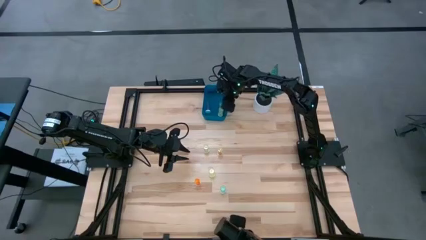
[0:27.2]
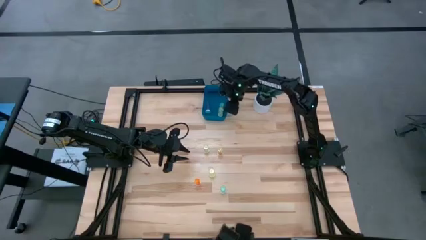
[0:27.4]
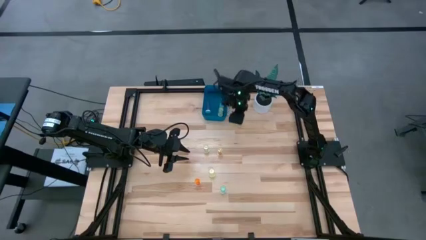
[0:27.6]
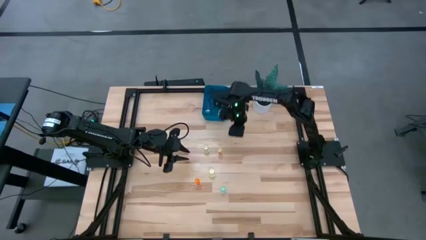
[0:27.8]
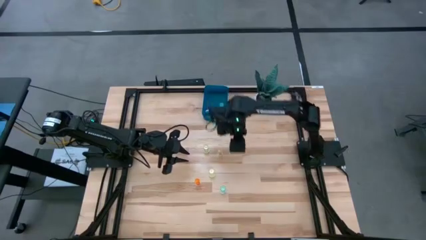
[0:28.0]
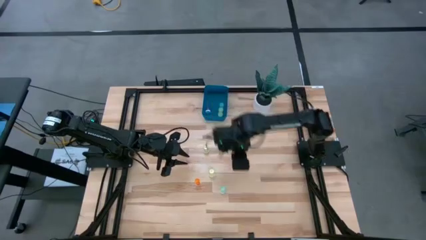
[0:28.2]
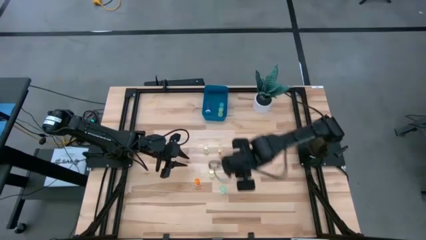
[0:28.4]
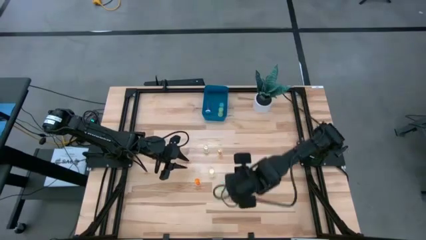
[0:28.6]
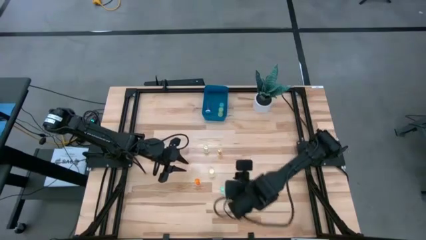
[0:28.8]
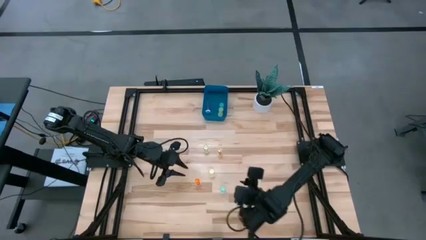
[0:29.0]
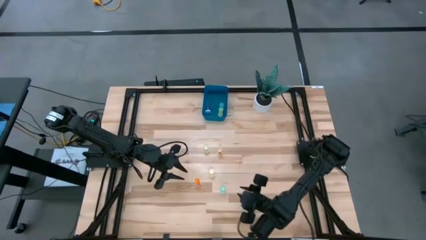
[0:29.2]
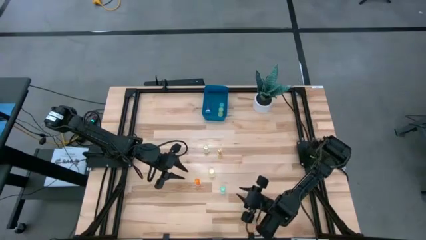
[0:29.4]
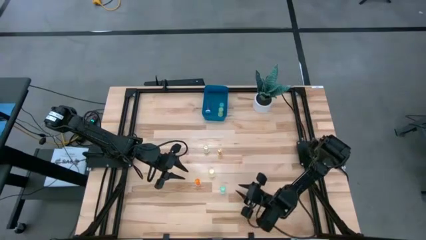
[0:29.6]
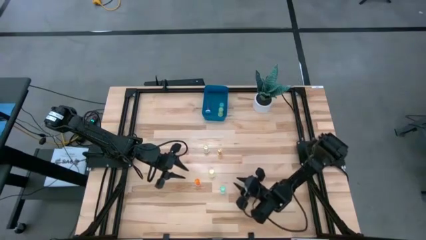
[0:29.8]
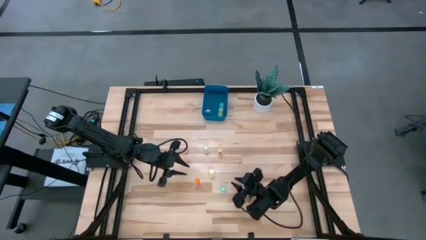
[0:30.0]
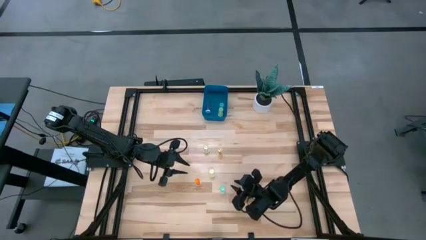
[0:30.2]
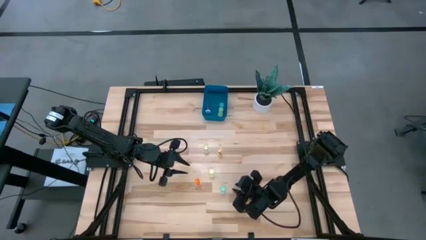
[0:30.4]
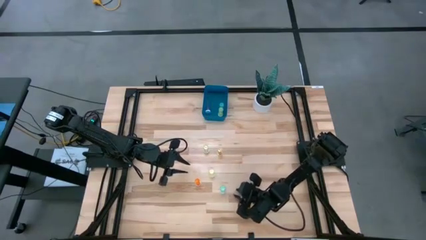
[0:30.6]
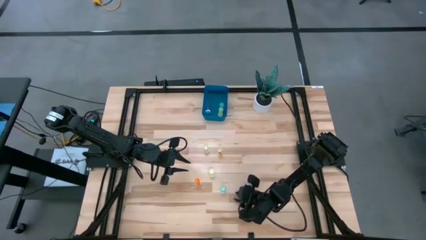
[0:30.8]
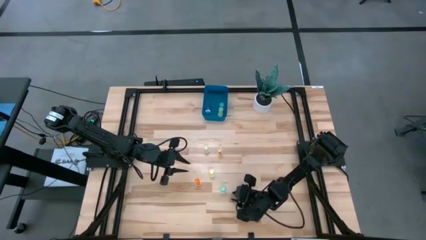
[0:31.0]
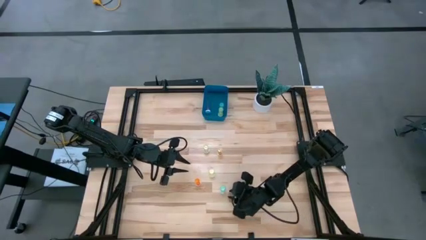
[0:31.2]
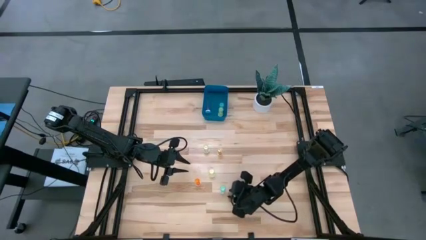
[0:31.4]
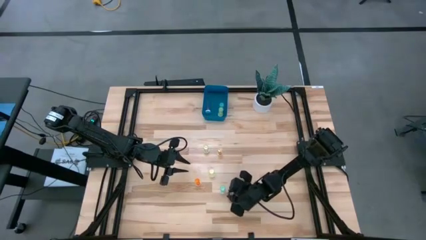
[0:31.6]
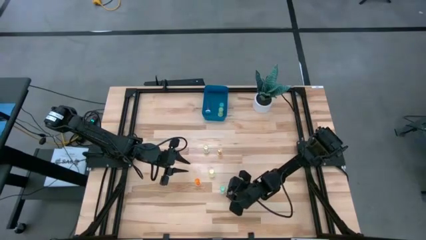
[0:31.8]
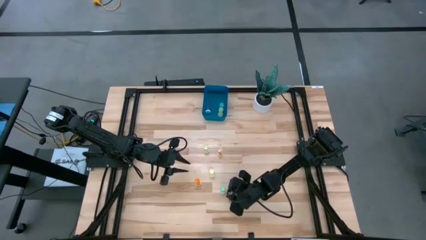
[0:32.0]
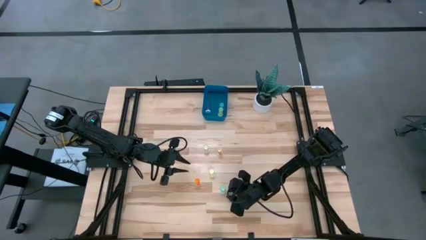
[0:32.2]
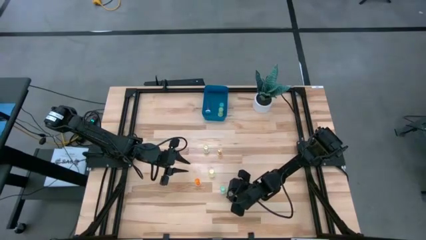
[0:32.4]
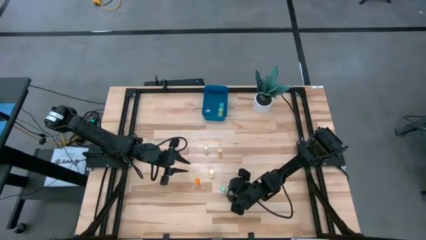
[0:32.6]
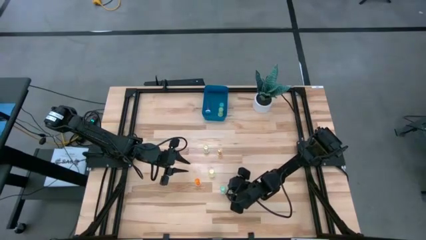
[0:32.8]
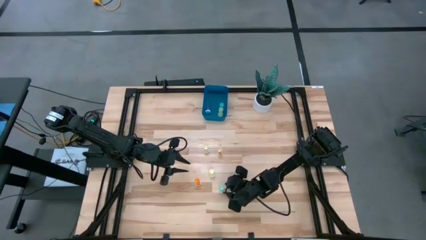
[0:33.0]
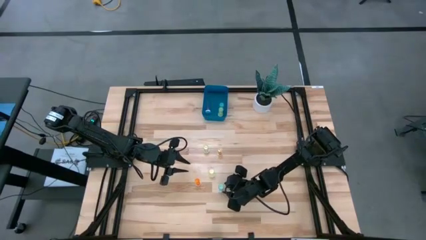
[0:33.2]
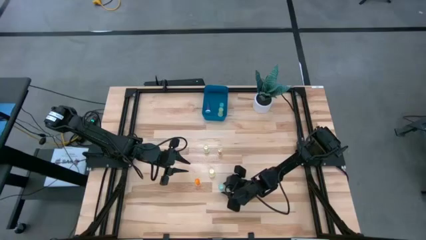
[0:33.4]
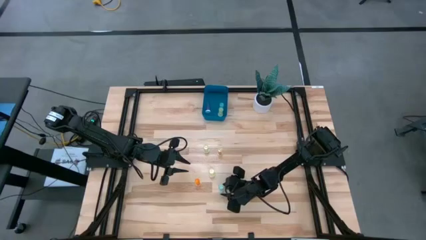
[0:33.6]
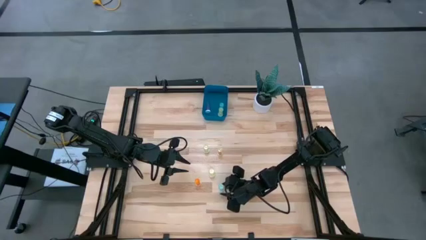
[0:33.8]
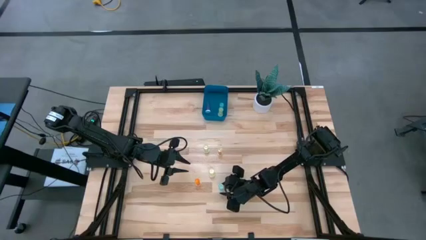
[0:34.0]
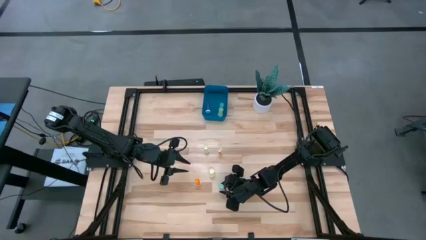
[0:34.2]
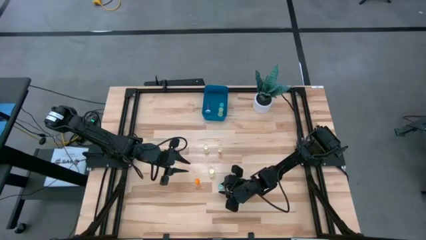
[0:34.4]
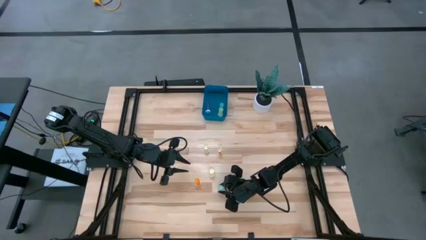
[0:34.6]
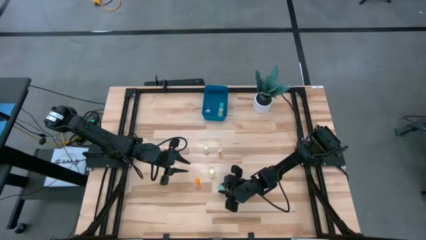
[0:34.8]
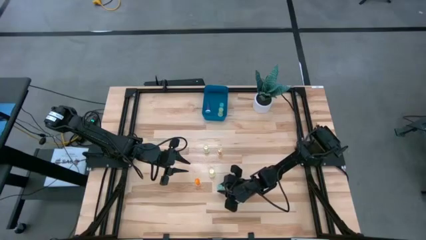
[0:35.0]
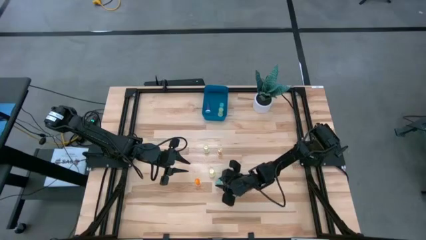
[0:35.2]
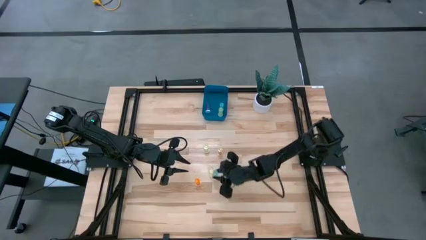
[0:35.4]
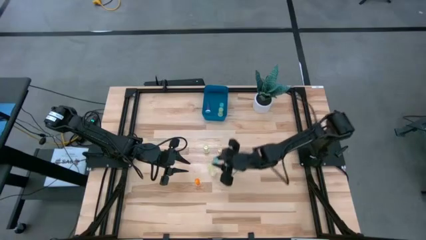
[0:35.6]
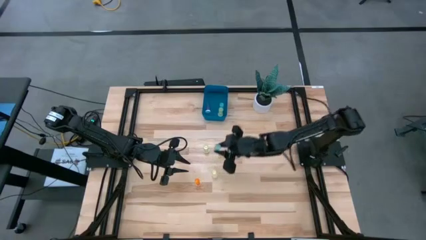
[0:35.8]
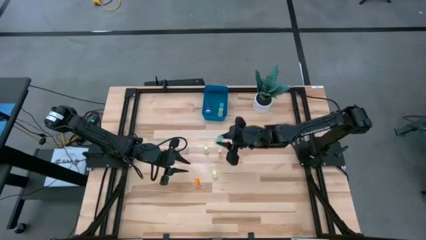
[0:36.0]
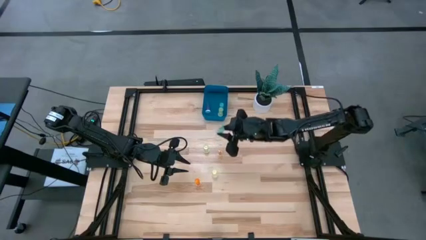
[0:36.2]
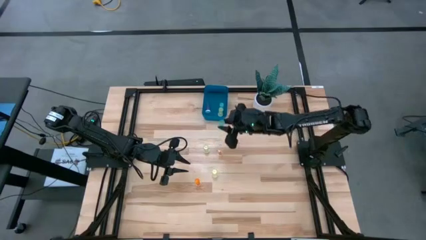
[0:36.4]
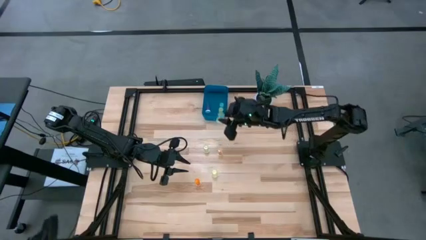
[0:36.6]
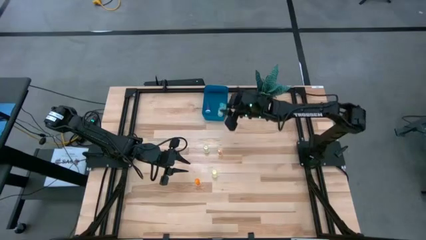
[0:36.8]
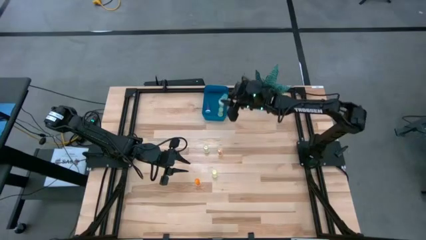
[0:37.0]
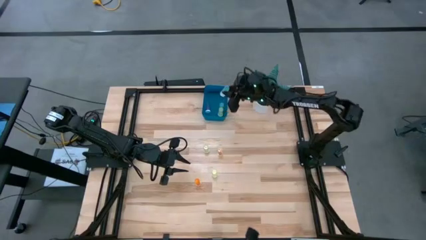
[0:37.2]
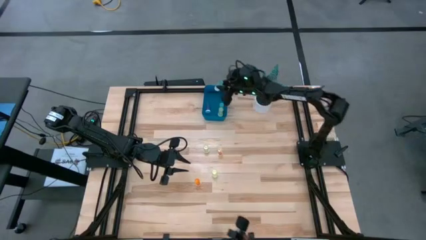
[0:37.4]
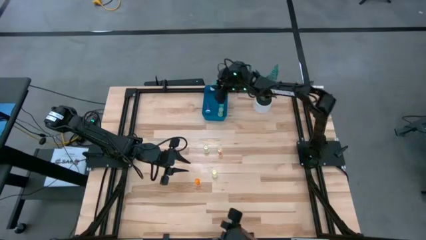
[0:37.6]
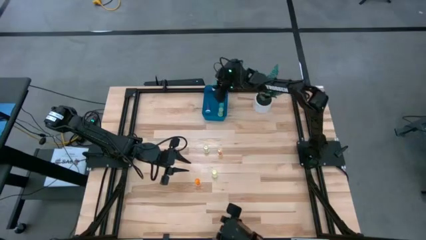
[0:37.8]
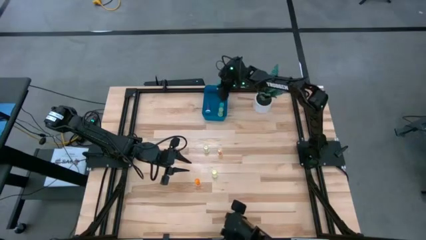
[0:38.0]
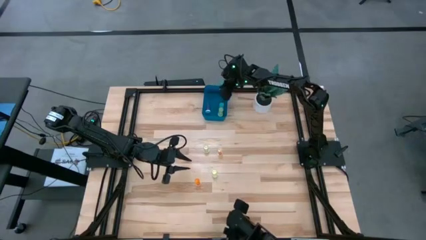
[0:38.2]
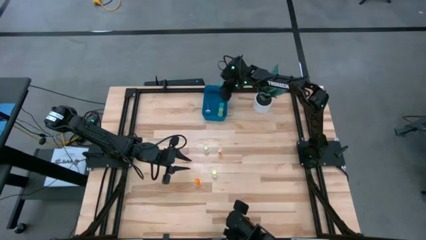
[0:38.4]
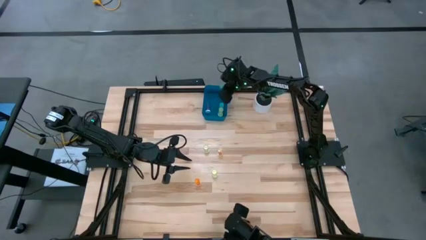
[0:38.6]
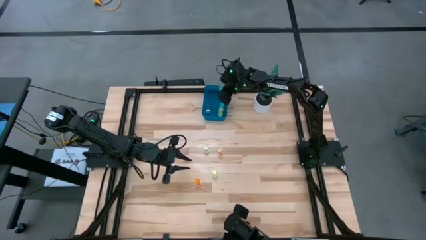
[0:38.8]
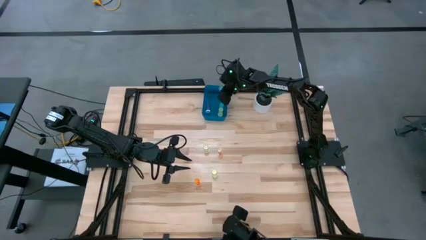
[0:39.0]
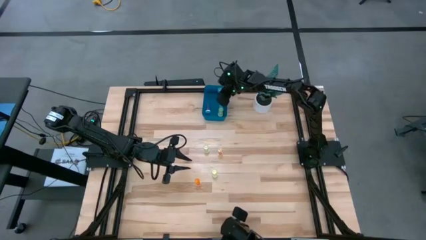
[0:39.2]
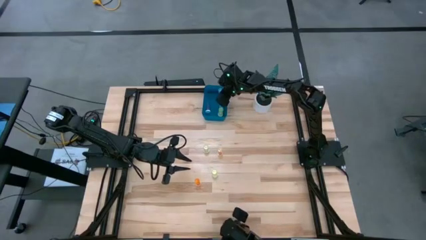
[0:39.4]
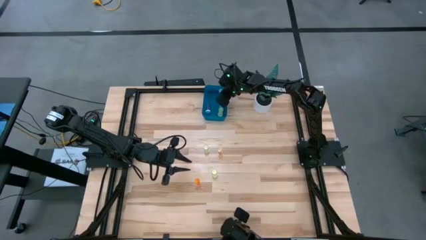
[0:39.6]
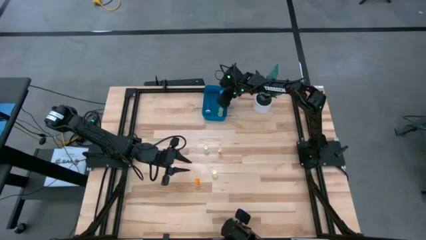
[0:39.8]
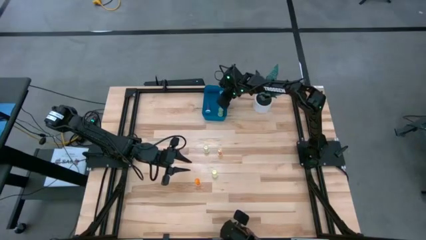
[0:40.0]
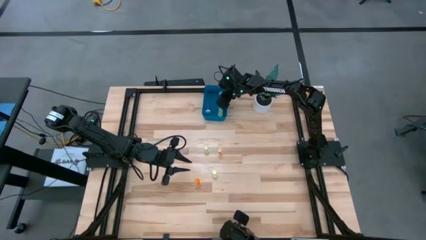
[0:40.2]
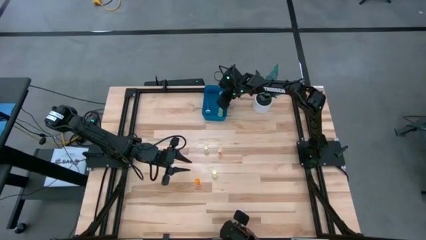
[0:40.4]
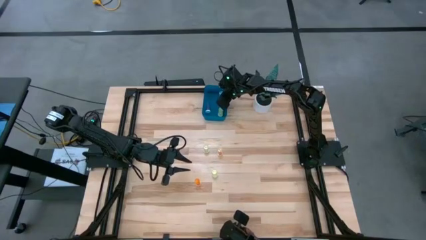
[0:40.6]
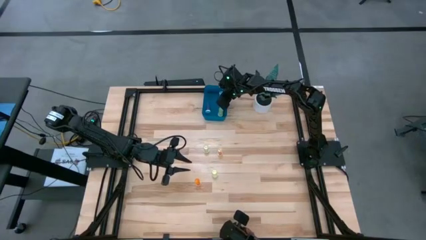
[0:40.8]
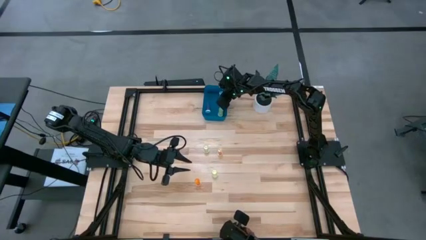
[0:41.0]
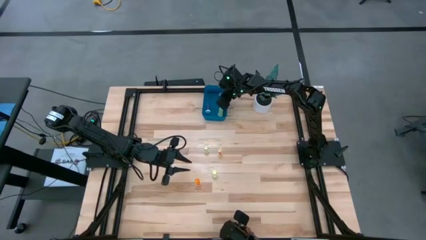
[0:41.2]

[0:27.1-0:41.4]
Task: Pick and place pill bottles into a basket
Put the green pill bottle into the blue container
